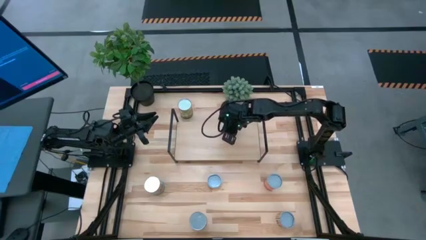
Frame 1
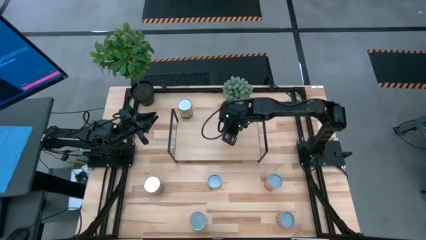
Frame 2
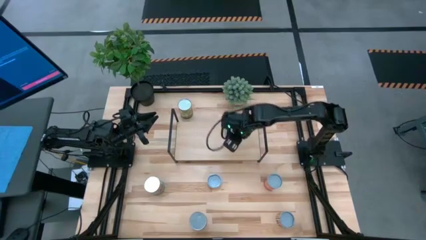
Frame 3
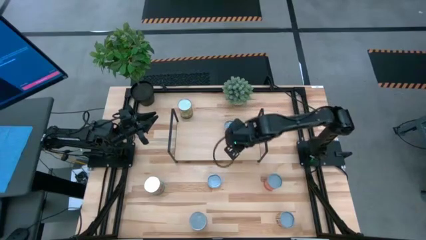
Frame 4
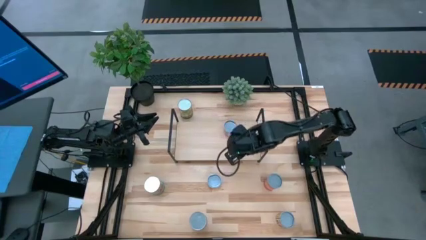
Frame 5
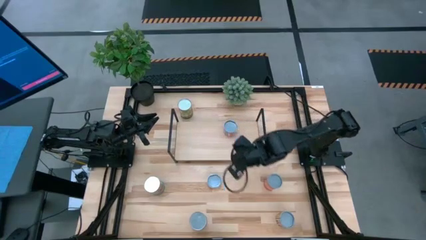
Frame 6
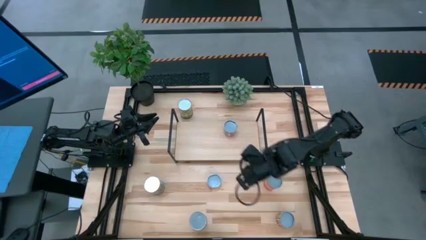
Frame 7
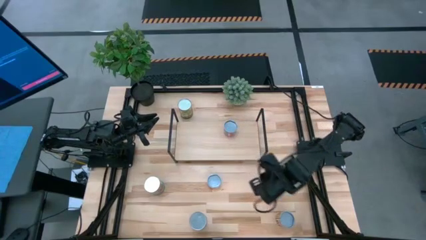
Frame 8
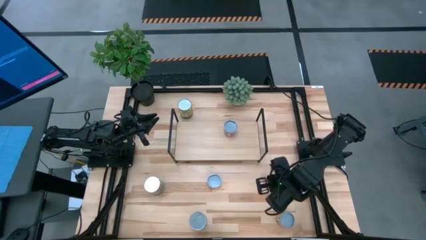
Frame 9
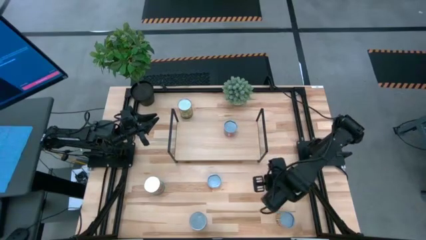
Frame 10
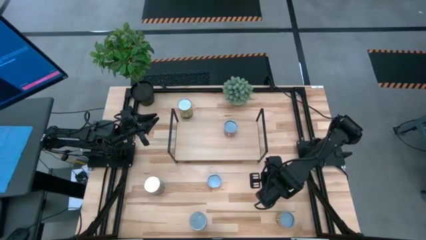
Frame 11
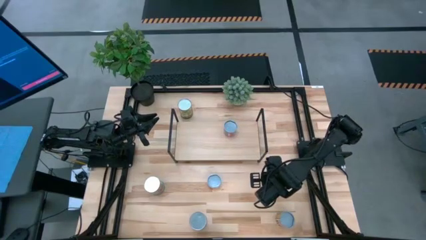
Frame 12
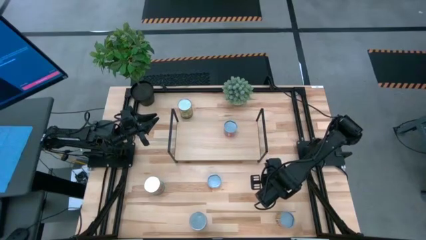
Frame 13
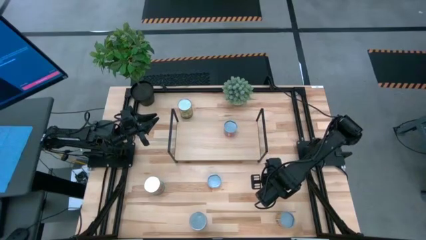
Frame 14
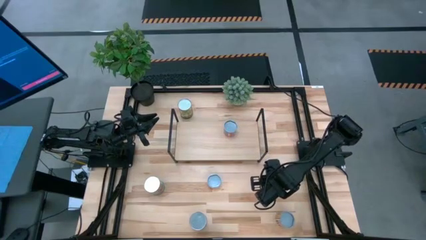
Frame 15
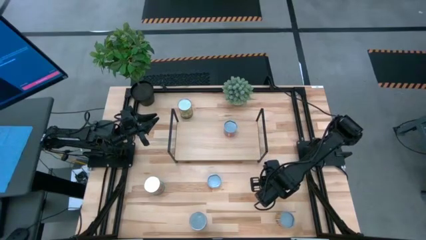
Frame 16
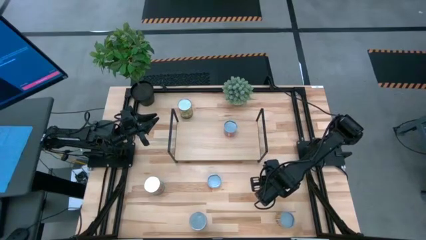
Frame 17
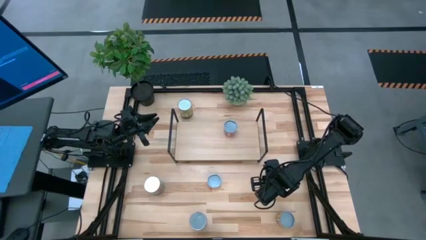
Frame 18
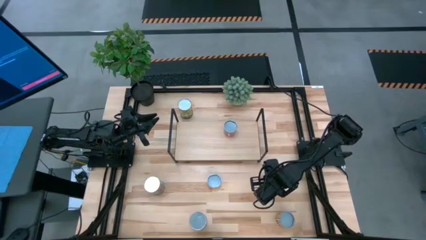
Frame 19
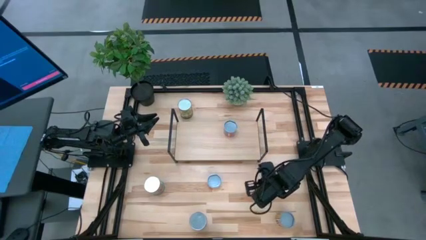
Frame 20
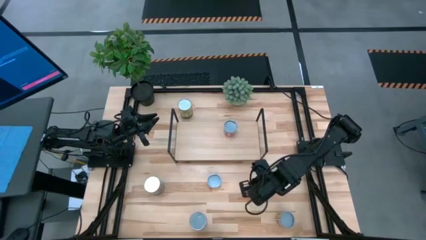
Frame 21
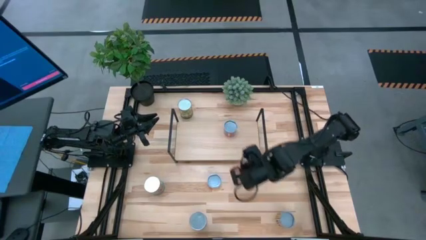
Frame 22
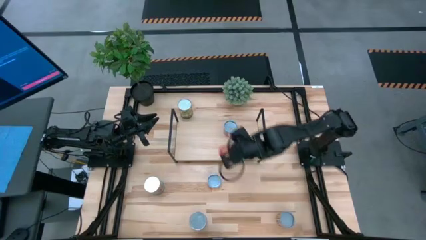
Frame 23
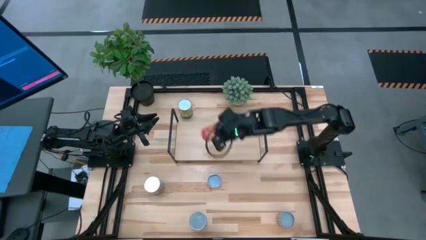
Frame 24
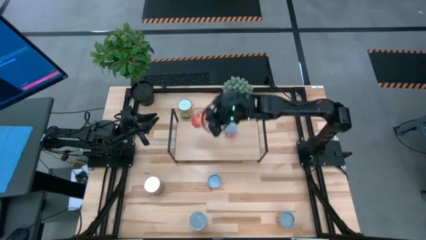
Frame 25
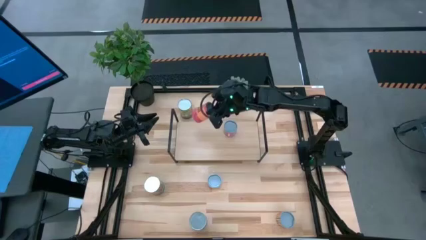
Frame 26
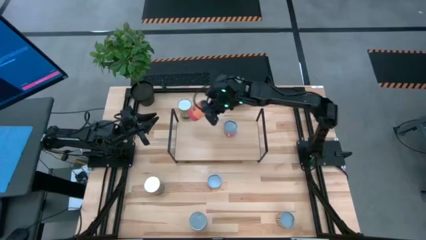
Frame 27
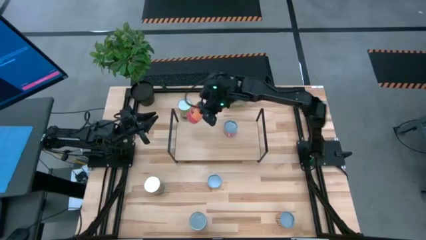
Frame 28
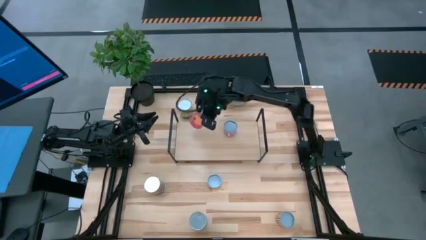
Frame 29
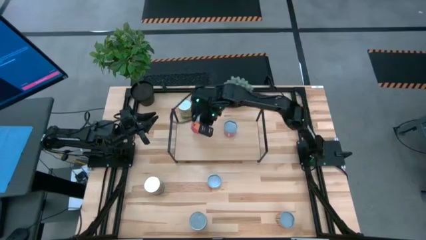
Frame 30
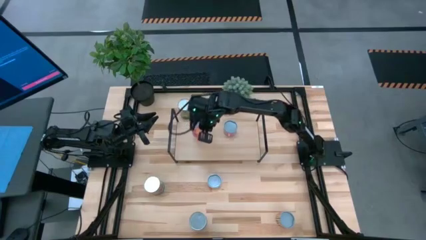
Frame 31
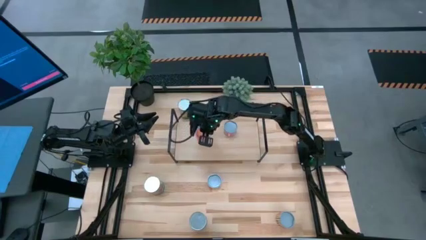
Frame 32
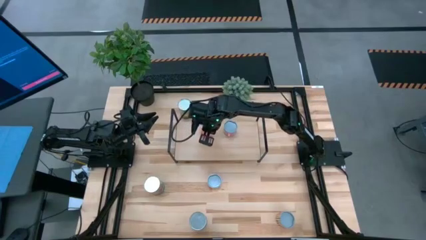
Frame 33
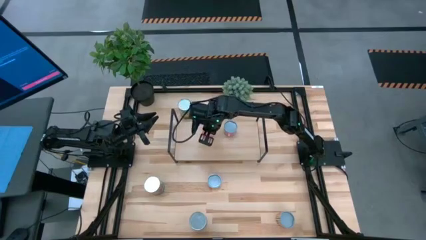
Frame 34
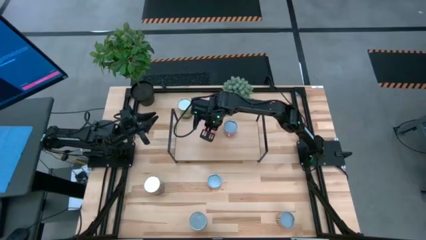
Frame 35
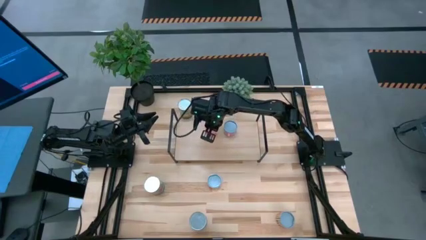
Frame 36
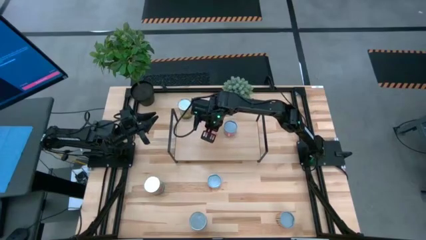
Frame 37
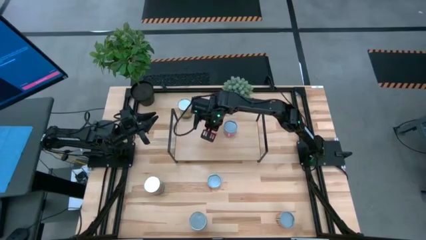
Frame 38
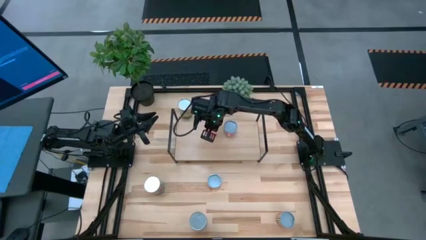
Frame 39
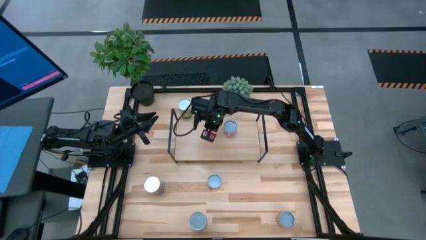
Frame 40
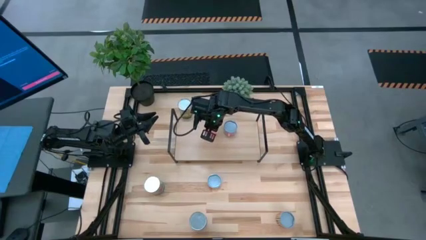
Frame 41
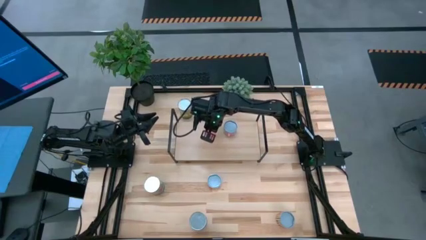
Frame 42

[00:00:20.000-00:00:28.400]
Task: Pick and place cans onto a shelf
Put the canned mixed fruit on the shelf

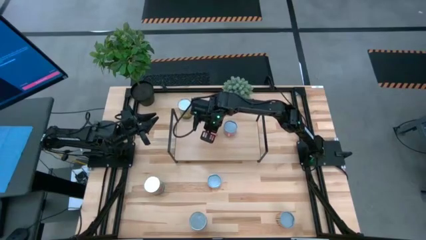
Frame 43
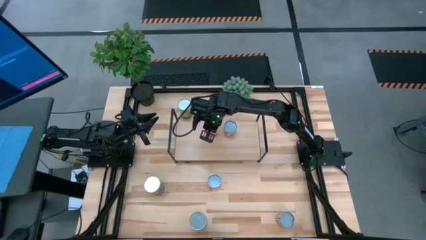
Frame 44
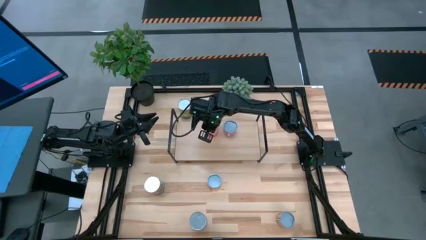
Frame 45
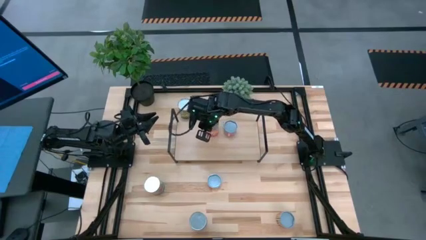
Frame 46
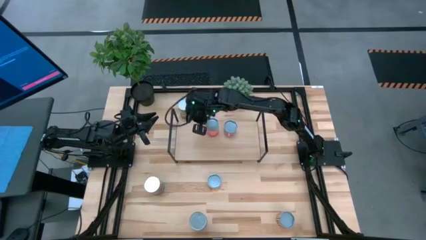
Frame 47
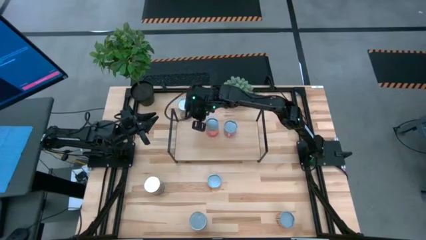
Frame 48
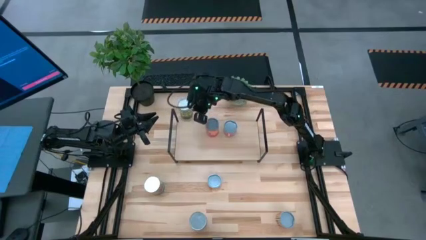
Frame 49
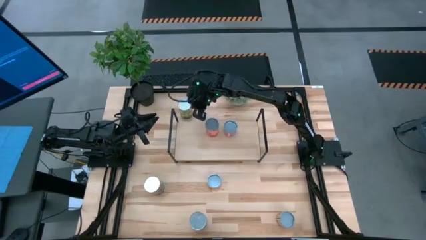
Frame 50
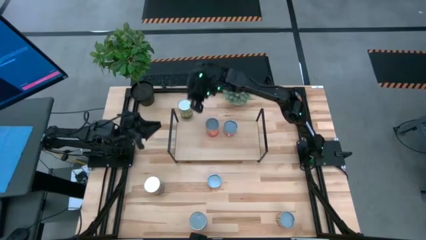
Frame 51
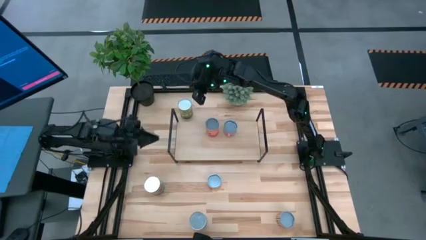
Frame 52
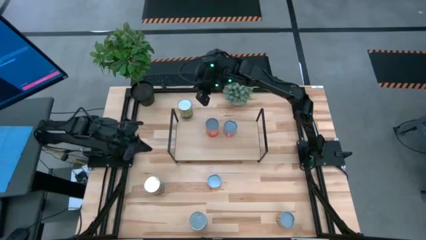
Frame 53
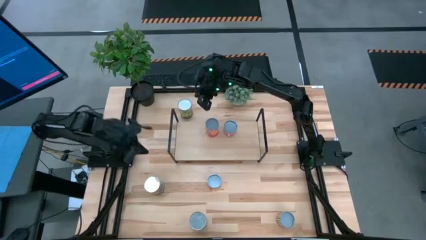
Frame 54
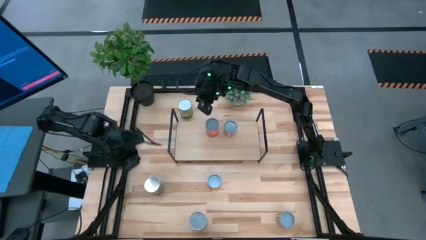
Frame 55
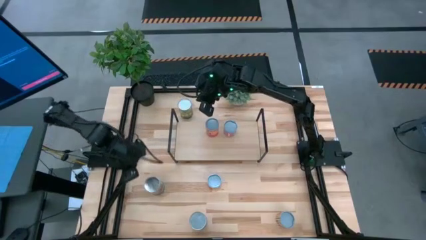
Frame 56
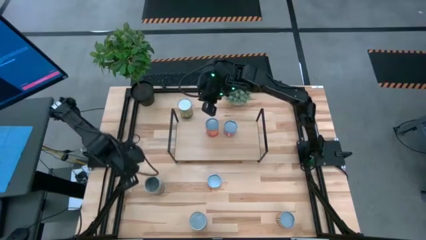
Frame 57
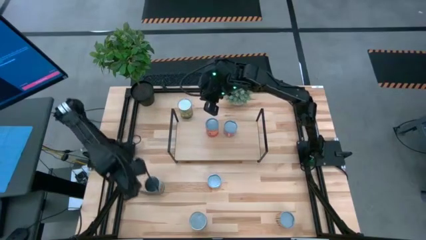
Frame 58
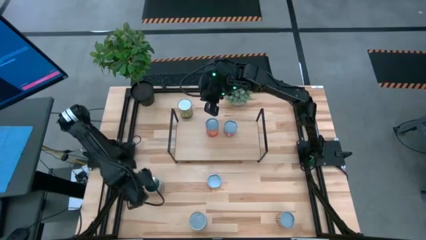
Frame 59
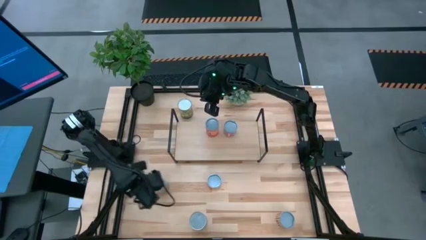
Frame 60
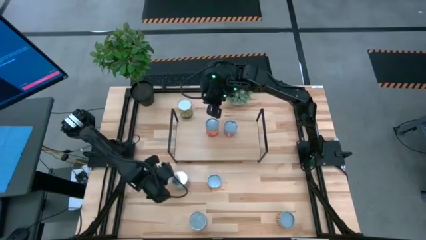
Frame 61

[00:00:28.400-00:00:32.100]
Move the canned tomatoes to the shelf
